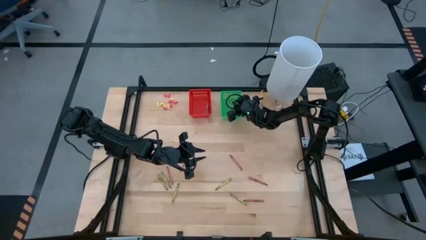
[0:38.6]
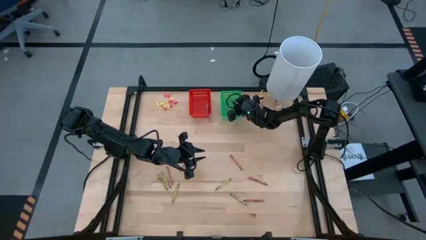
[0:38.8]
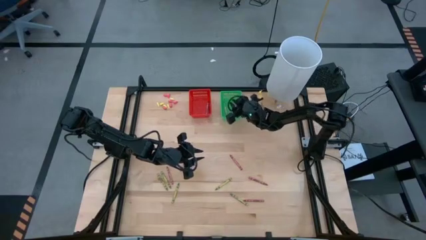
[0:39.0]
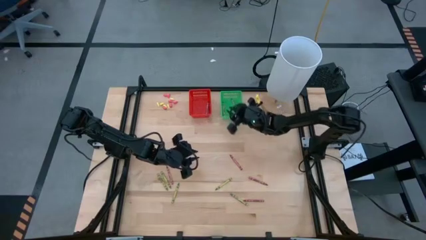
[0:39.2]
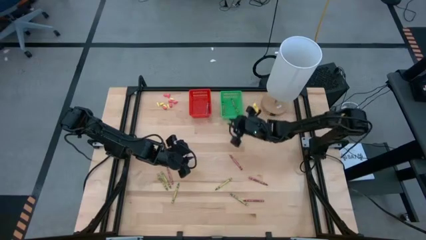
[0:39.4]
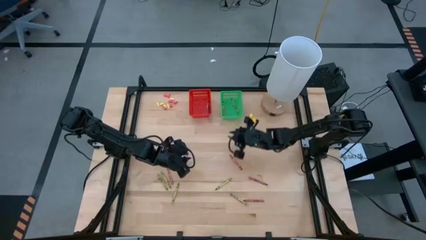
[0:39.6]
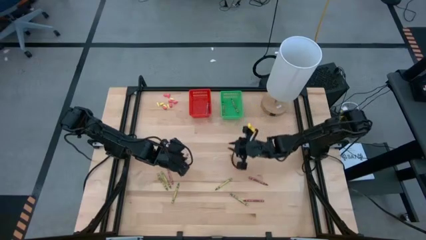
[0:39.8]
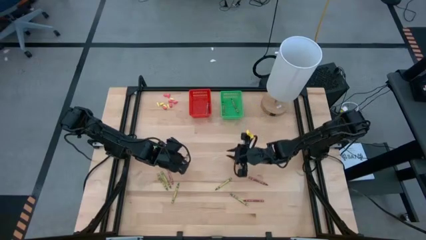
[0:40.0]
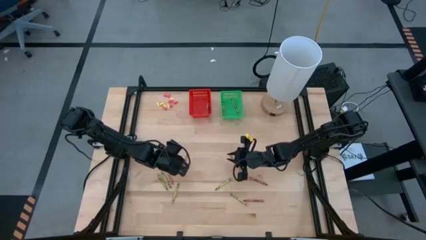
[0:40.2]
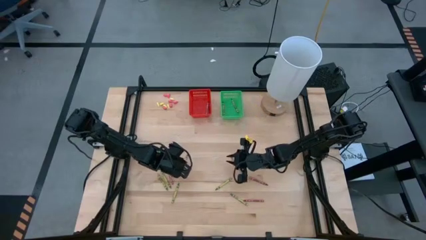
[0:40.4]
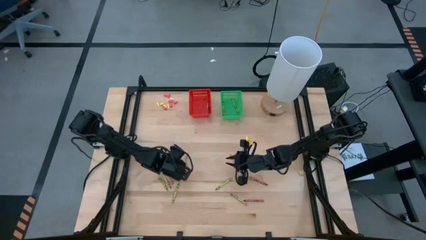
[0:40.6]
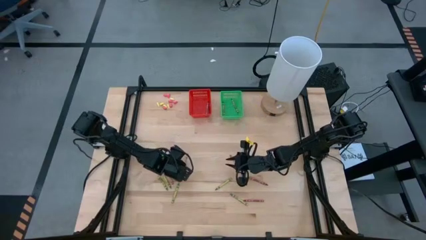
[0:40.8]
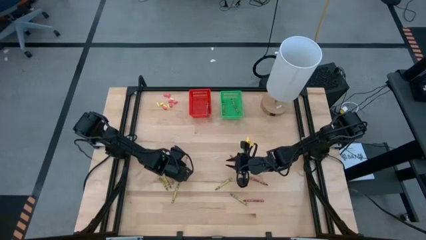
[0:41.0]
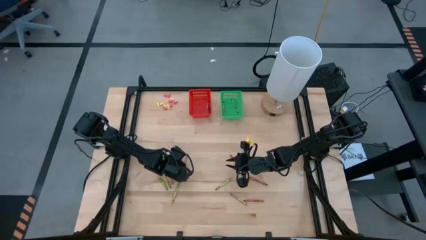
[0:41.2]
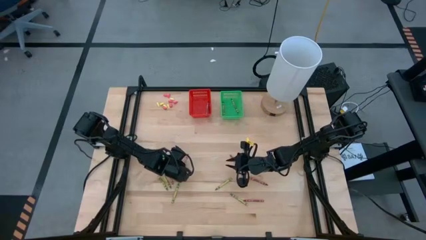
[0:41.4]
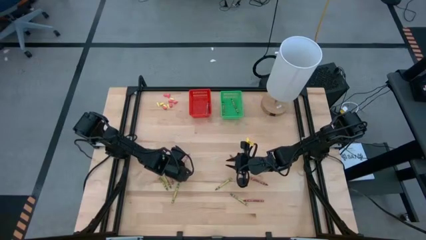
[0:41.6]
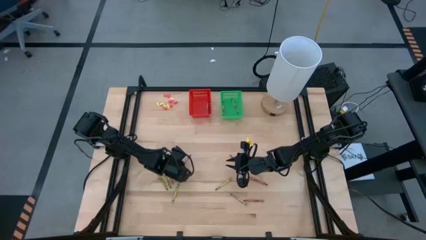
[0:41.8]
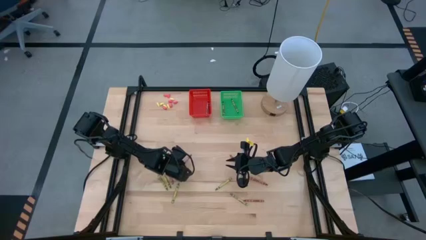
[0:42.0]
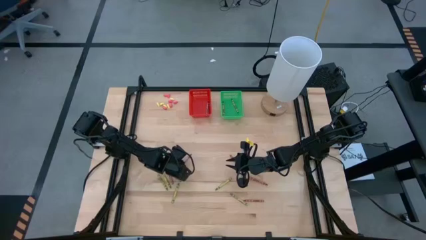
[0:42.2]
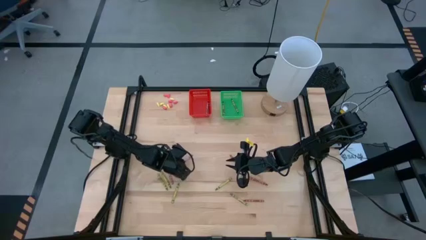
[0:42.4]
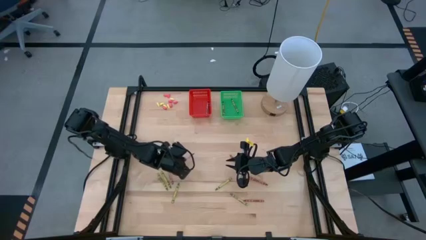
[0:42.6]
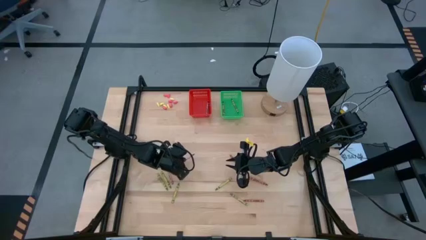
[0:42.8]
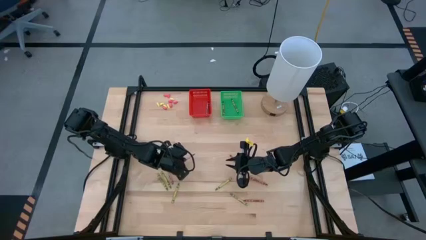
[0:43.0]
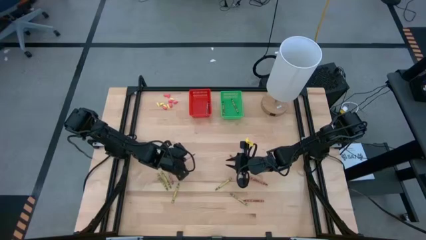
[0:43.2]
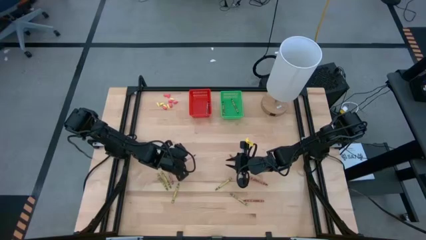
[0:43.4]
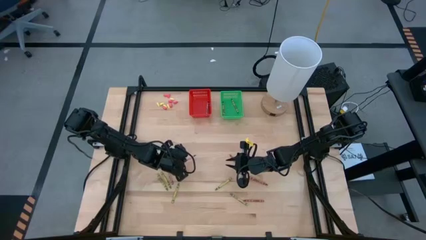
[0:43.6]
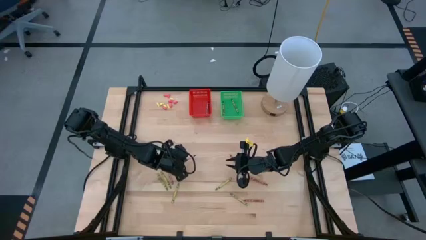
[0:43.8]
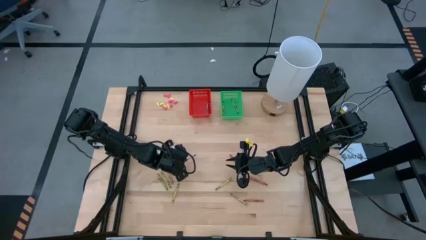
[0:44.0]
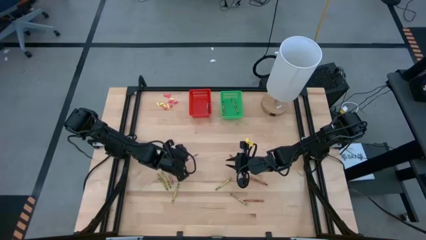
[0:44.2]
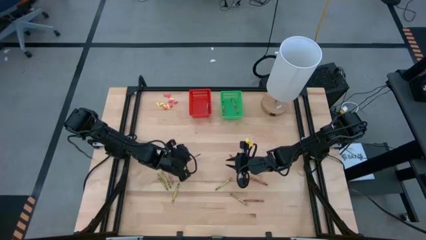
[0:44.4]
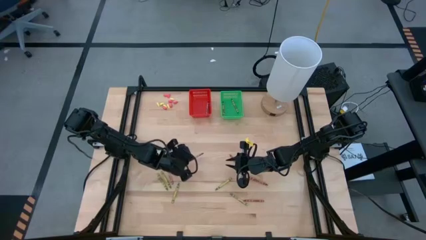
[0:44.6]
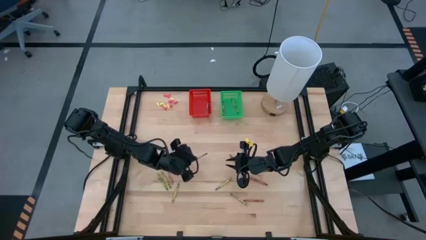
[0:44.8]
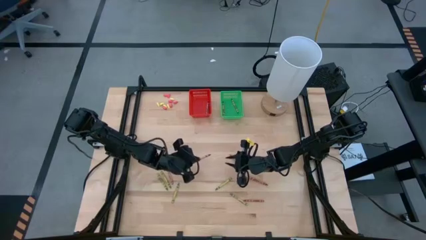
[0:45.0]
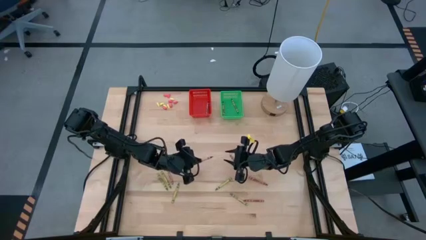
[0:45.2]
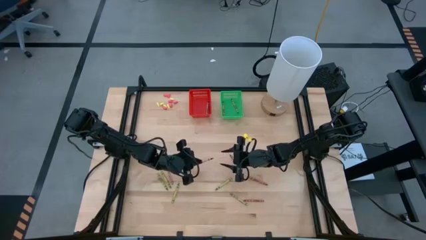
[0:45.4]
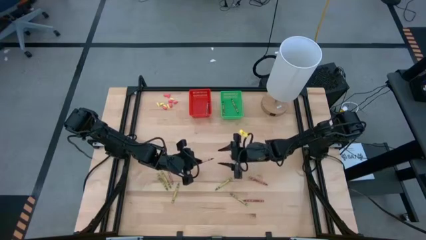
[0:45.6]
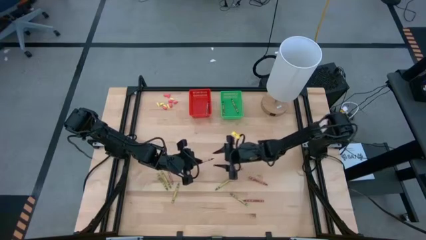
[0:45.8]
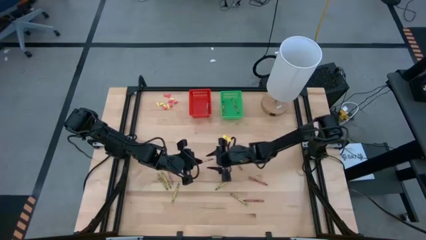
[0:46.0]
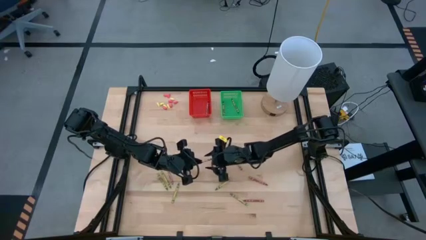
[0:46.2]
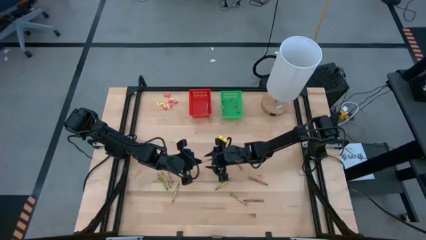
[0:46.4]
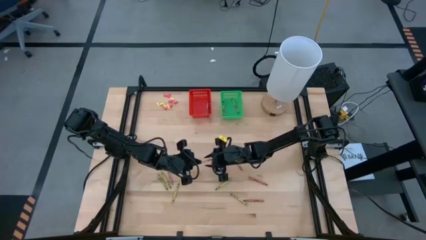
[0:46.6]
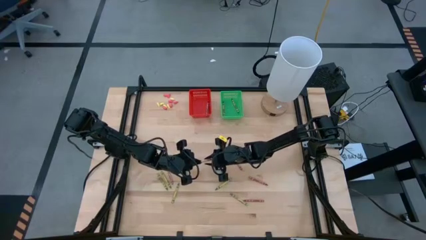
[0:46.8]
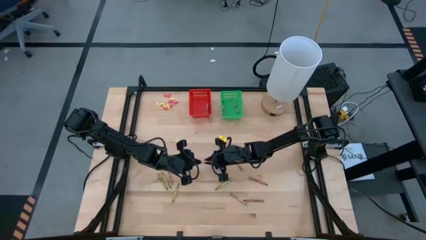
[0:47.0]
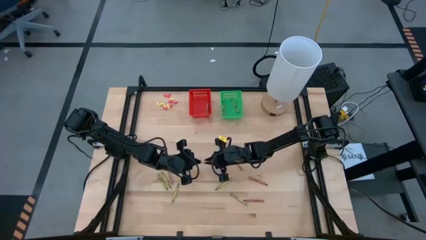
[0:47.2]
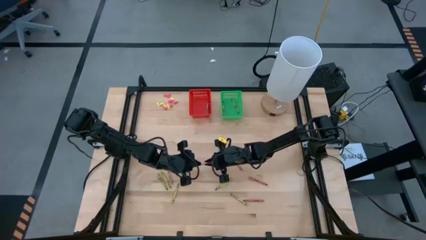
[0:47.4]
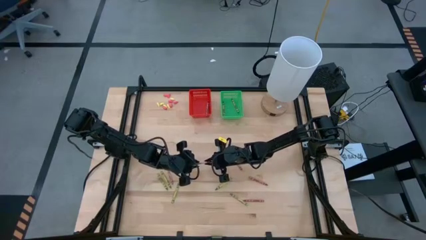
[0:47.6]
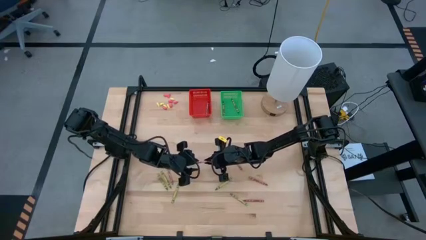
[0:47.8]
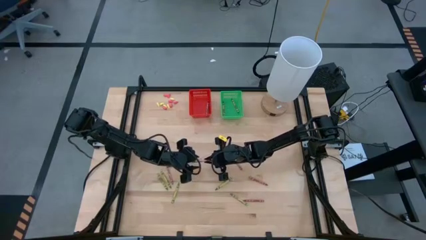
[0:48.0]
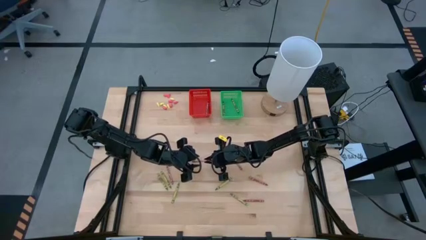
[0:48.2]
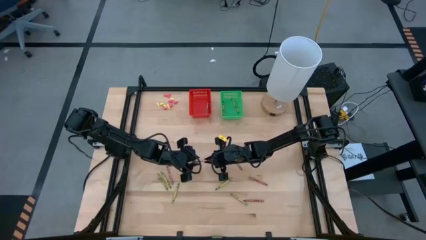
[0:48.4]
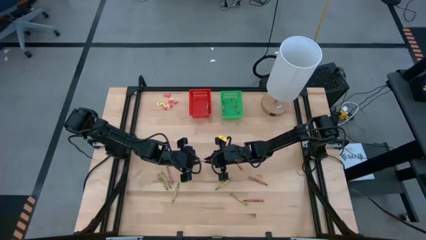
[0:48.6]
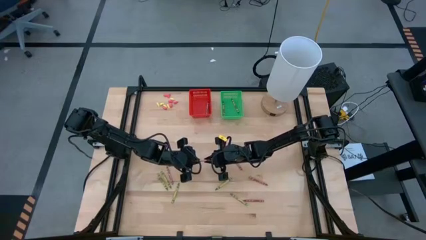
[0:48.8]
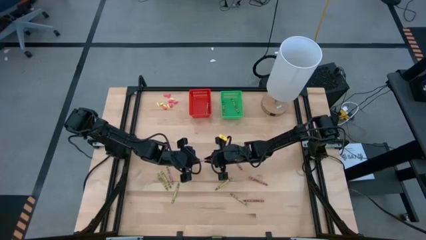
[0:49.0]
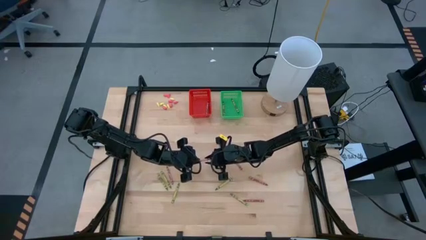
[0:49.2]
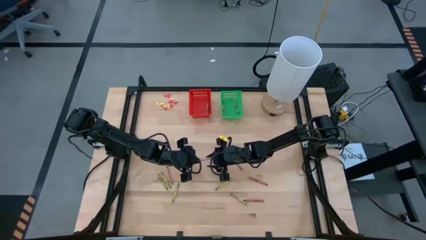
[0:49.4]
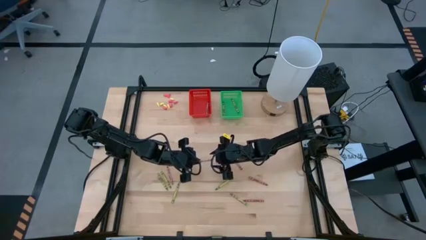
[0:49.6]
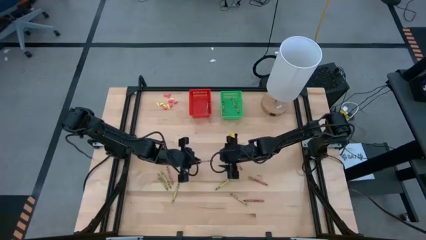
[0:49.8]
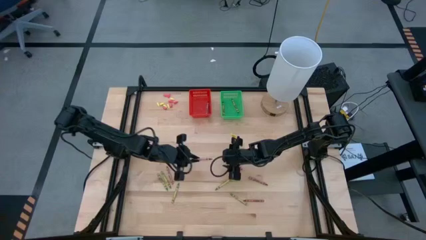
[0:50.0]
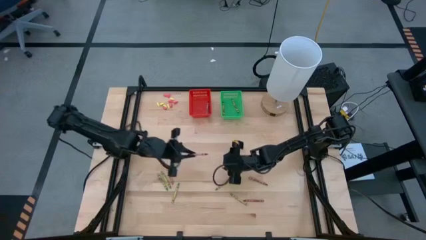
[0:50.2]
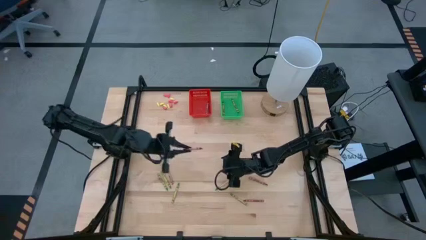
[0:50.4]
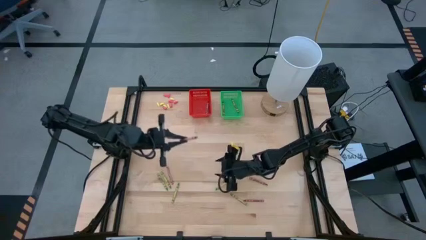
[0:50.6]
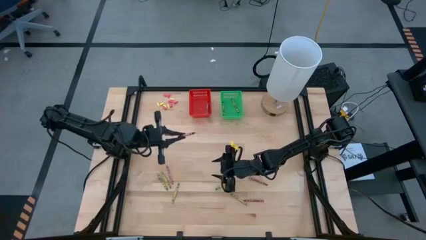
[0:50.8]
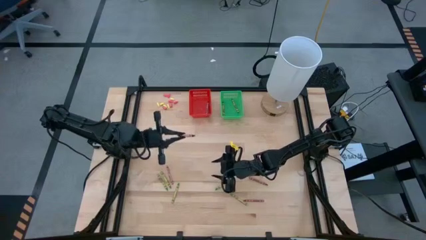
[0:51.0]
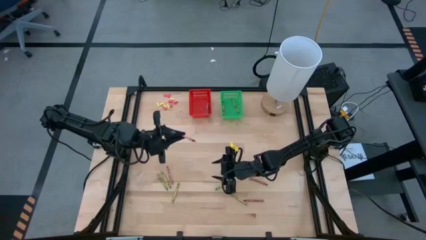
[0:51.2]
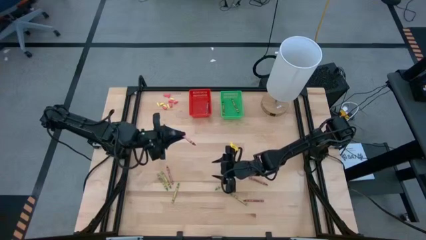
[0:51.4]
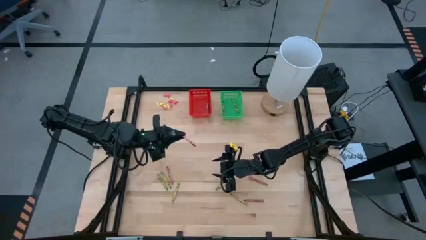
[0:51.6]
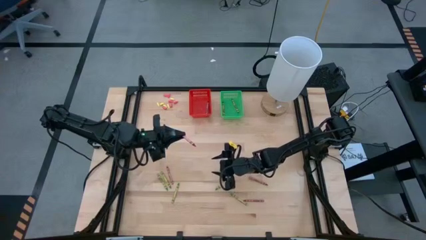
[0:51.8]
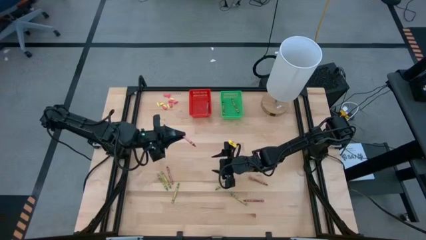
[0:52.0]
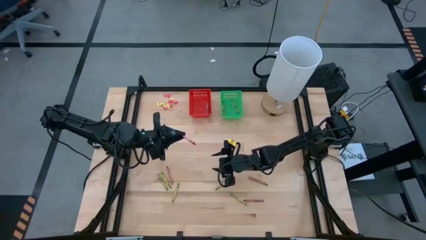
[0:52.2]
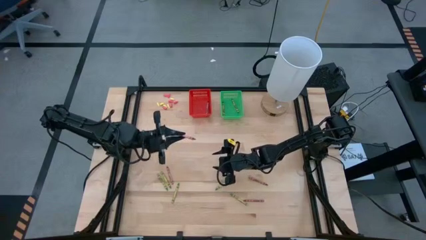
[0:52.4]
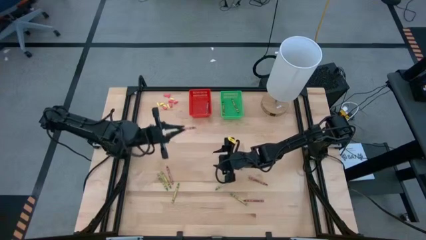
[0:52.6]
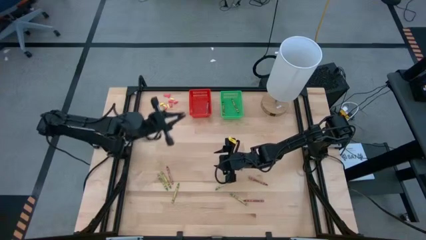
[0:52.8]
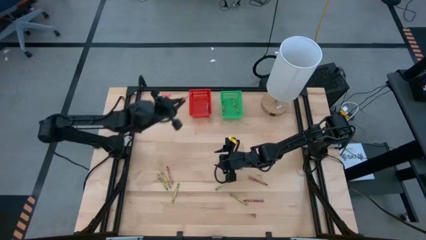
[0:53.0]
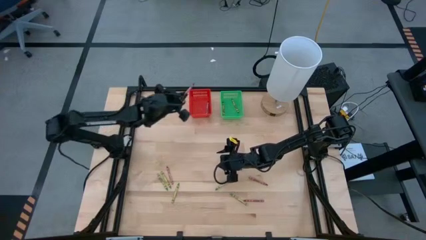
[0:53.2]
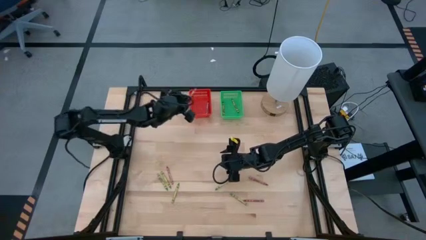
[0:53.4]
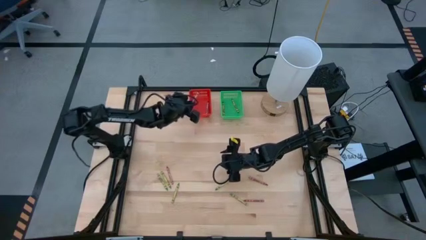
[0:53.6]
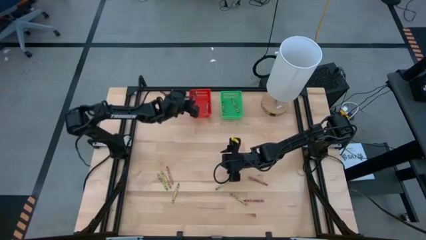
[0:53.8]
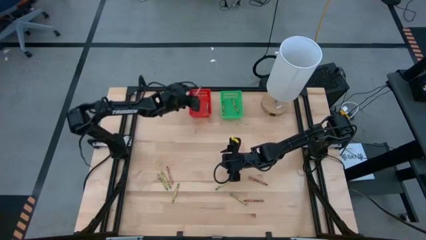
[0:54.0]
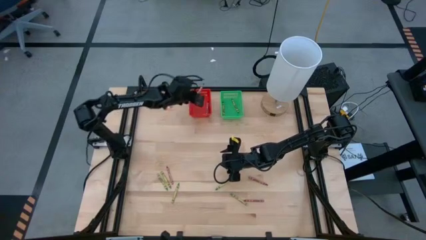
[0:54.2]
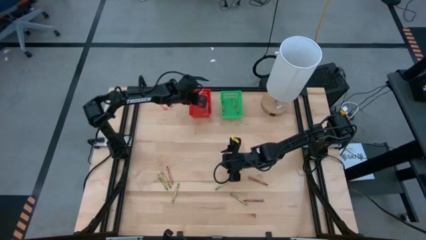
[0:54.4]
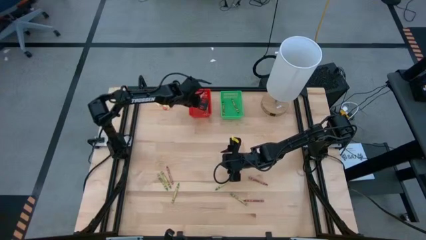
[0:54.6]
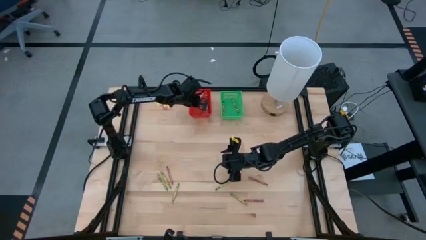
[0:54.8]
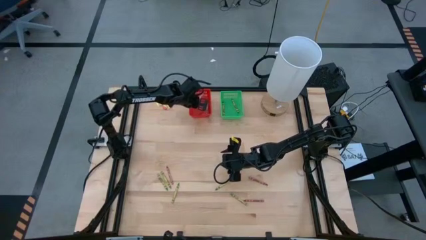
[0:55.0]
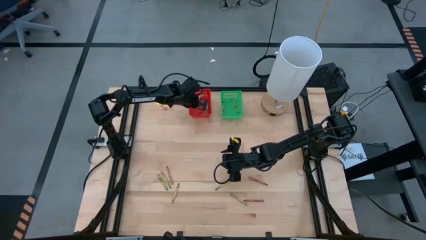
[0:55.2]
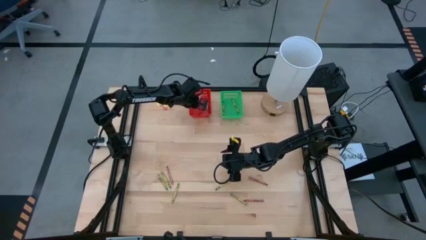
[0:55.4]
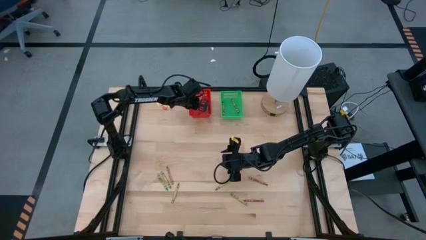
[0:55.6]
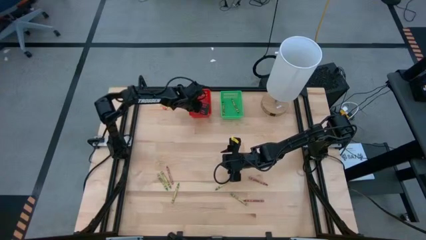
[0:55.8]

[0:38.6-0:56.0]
Task: Sort crayons
Put the red crayon into the red bin
